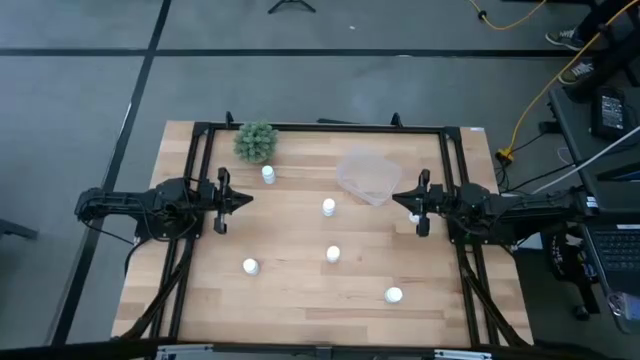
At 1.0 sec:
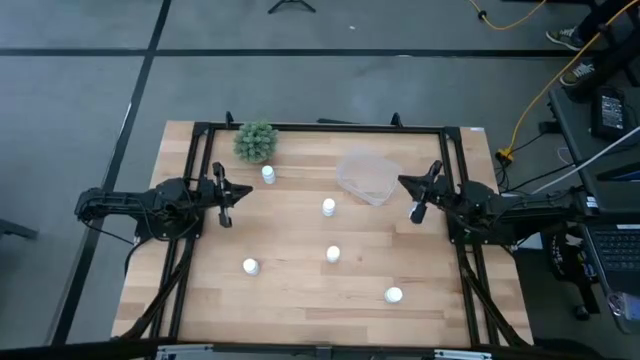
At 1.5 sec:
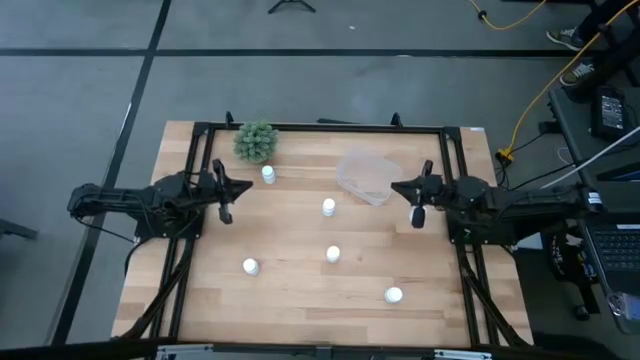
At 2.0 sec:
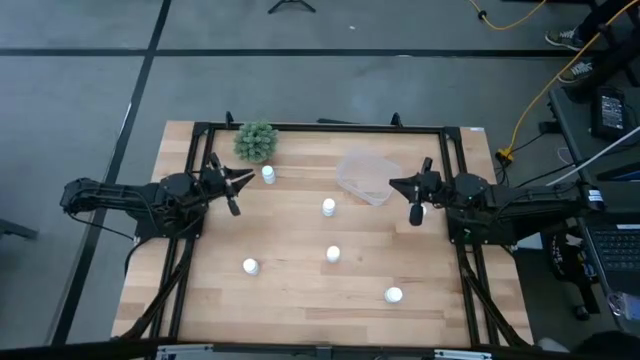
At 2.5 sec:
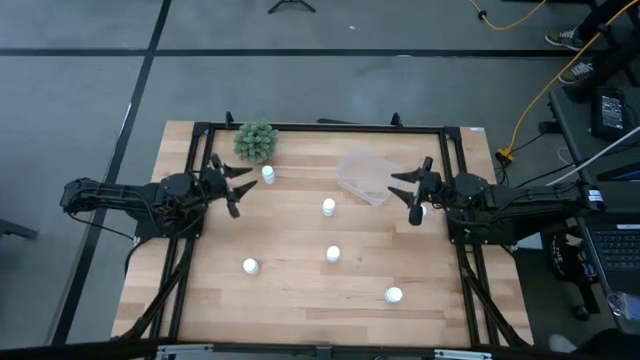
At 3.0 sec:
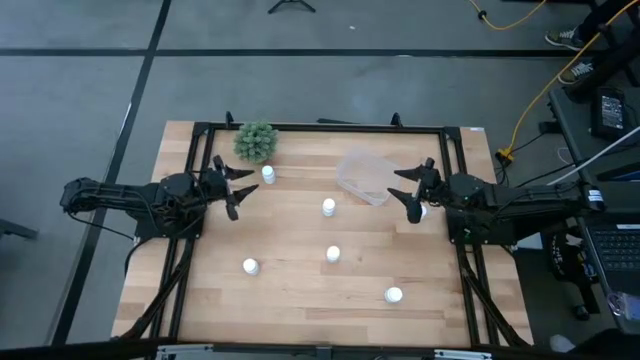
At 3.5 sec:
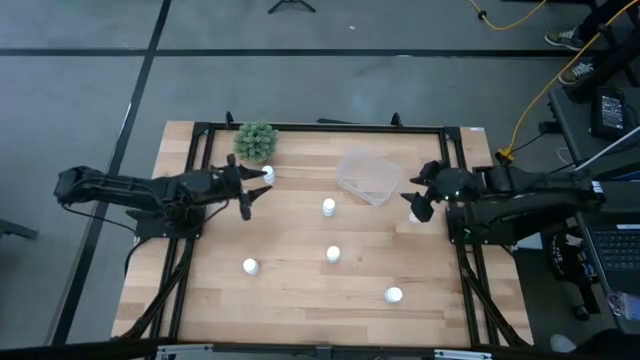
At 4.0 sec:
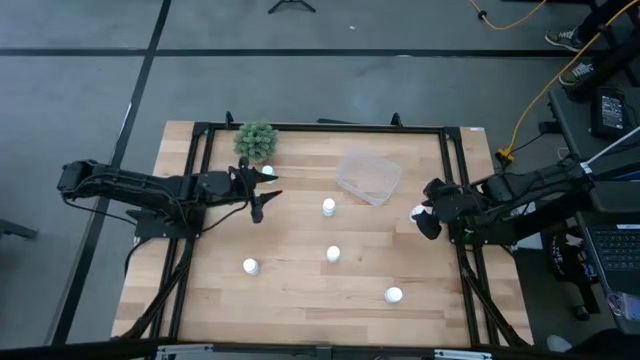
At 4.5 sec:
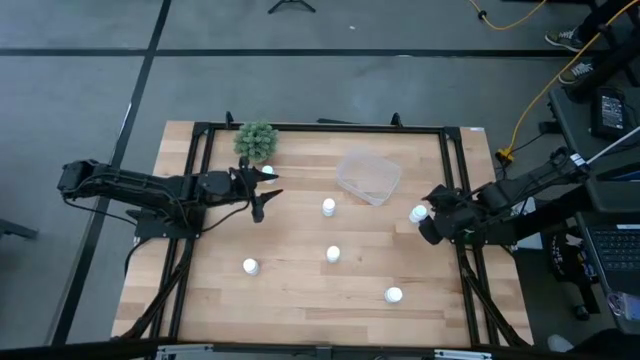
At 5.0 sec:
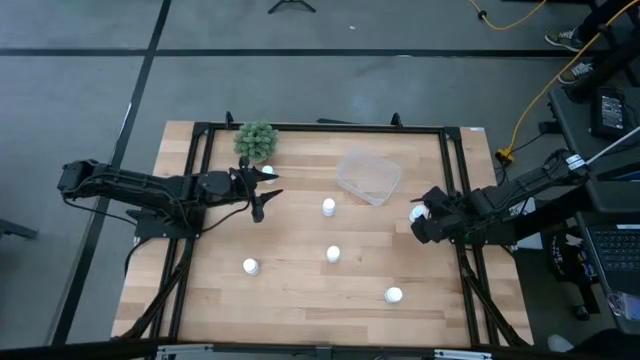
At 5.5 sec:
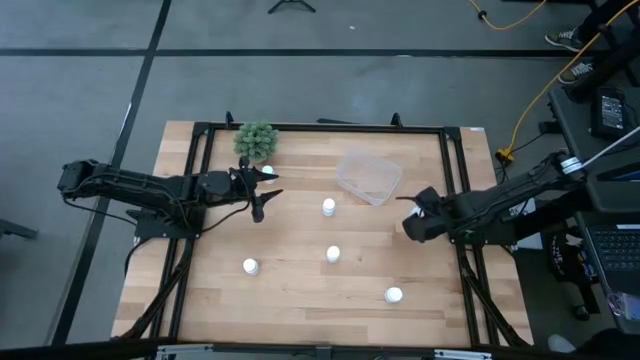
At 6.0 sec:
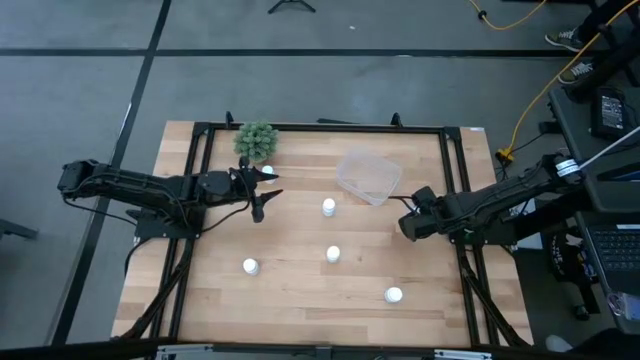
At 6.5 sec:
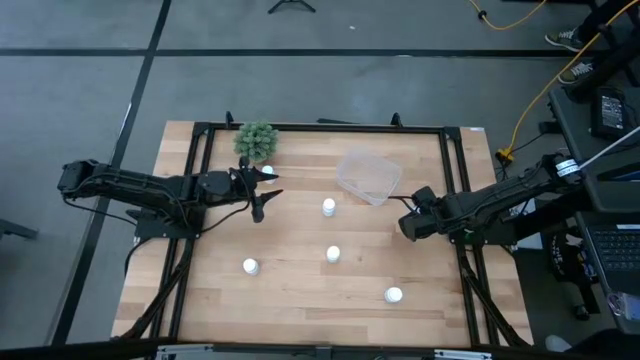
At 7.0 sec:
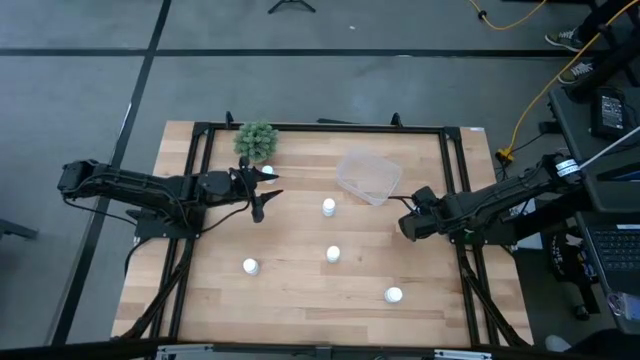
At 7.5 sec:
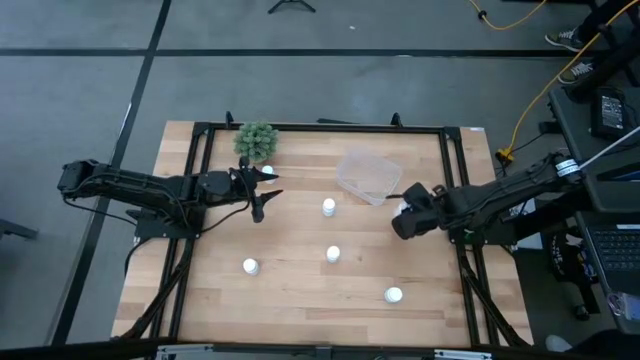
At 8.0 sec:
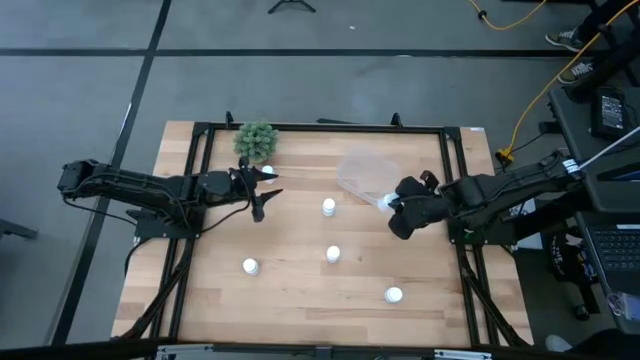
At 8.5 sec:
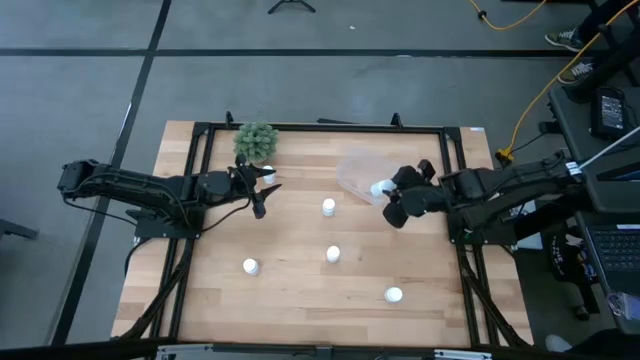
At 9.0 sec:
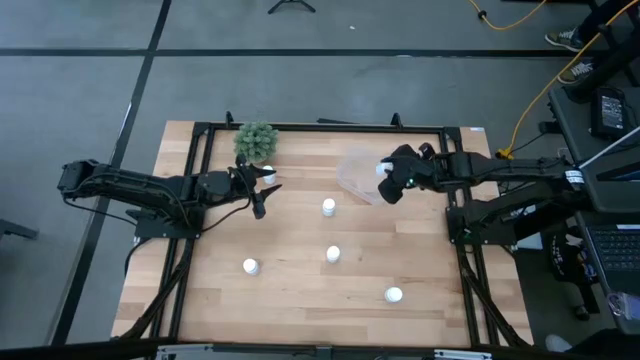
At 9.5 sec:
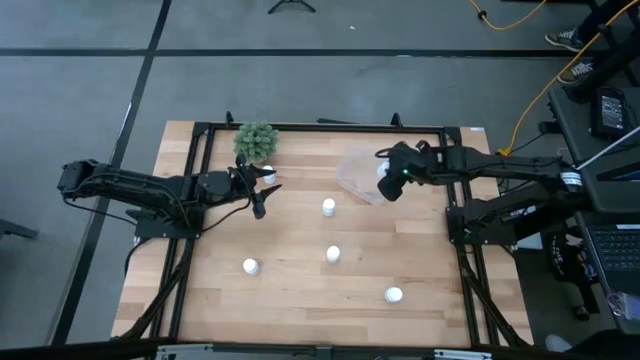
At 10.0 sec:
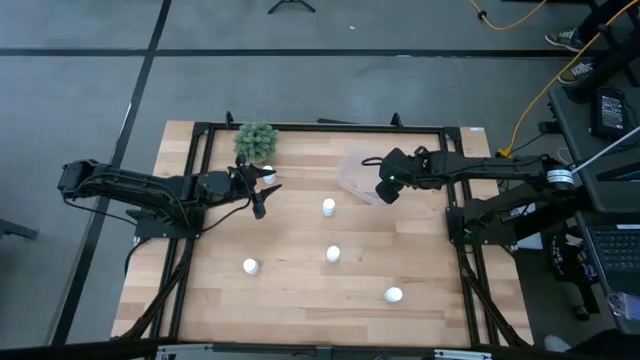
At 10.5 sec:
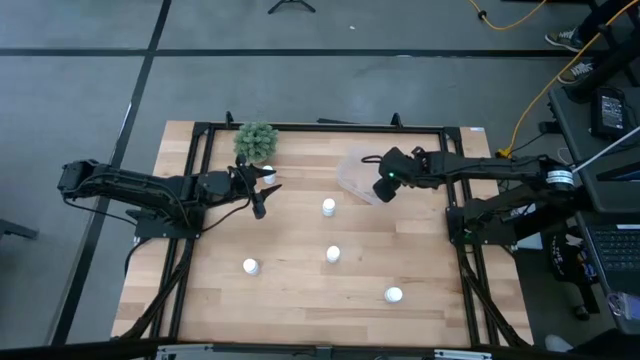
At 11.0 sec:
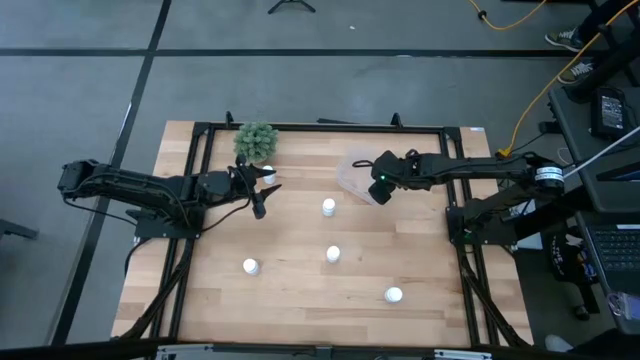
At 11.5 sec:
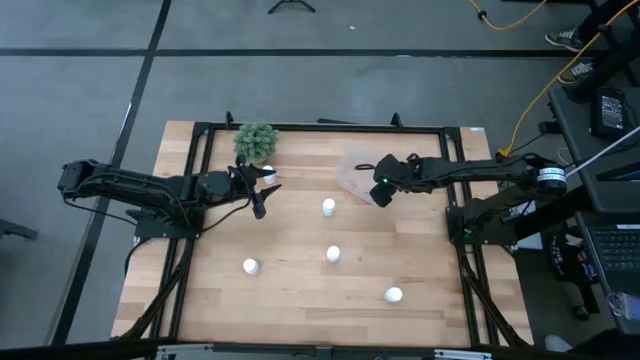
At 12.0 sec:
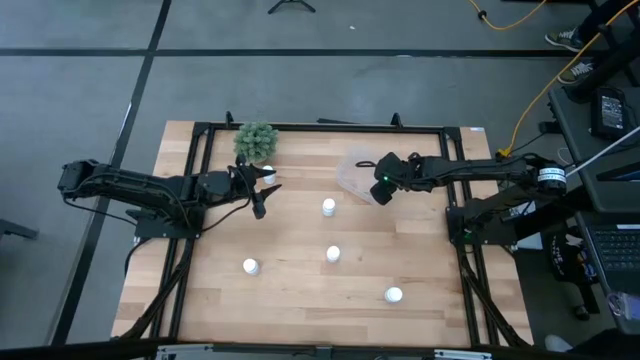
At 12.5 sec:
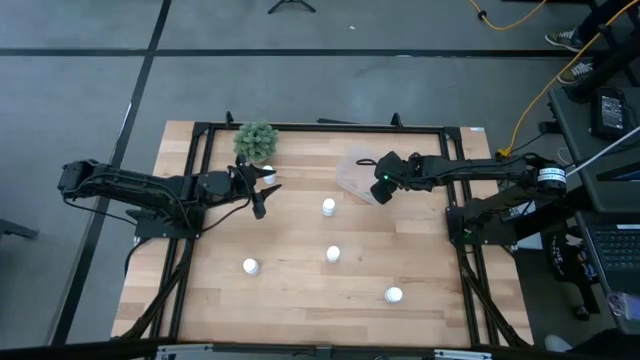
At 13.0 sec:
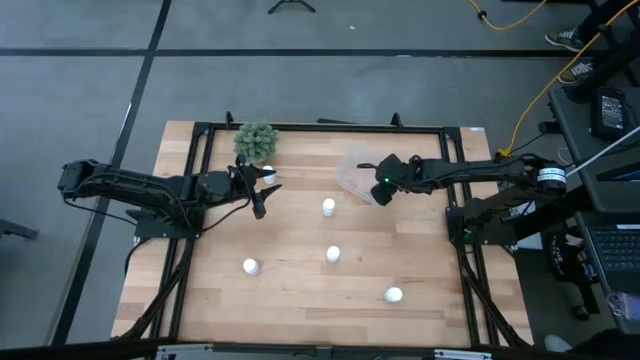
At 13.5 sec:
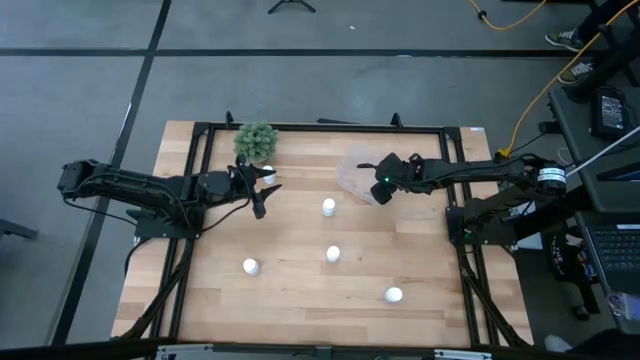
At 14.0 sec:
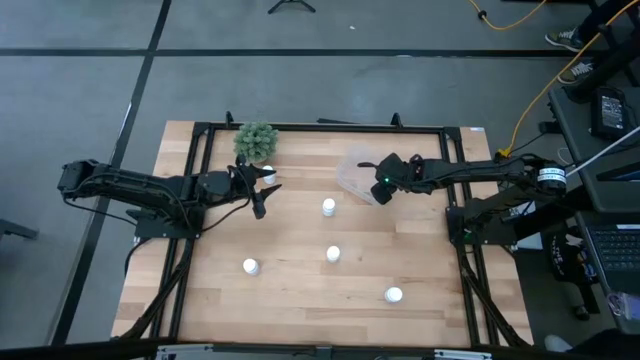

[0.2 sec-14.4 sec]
Task: Pick and place pill bottles into a basket
Put the white pill bottle into the transparent bin

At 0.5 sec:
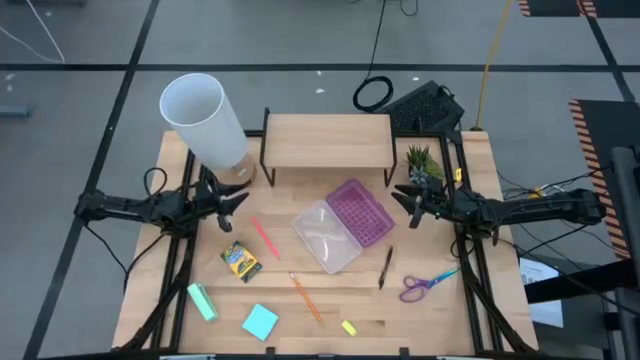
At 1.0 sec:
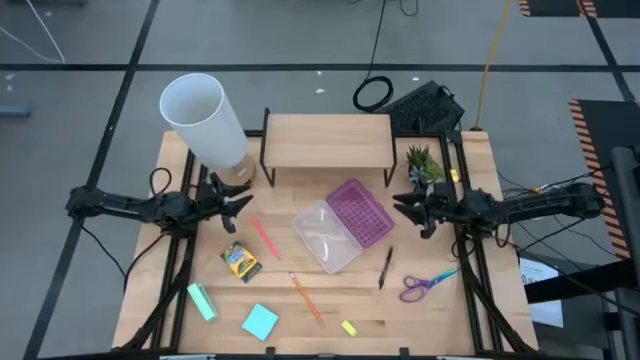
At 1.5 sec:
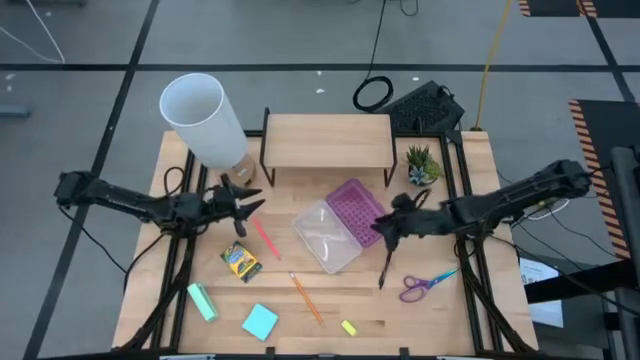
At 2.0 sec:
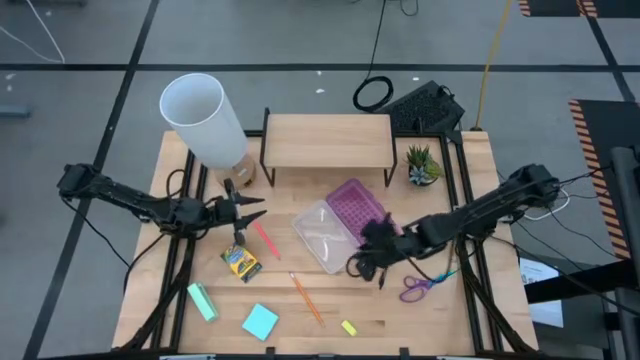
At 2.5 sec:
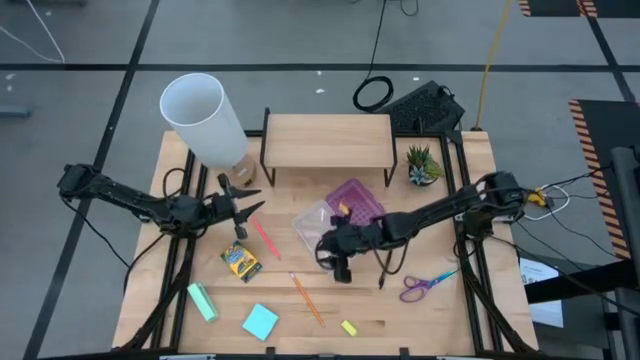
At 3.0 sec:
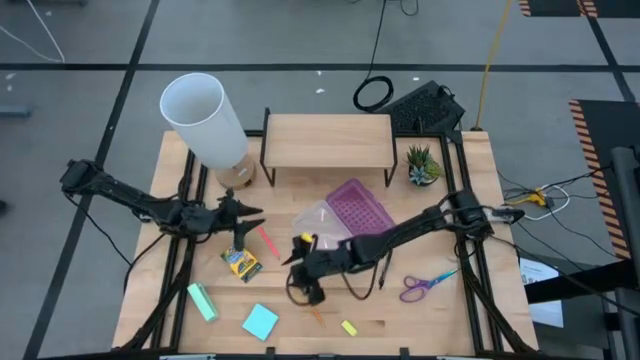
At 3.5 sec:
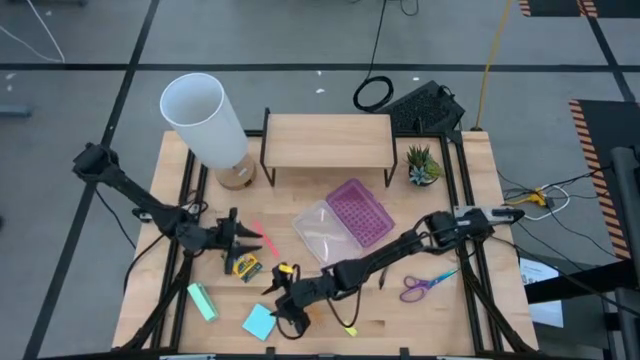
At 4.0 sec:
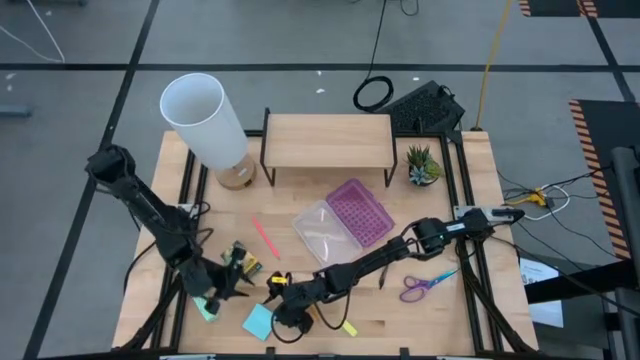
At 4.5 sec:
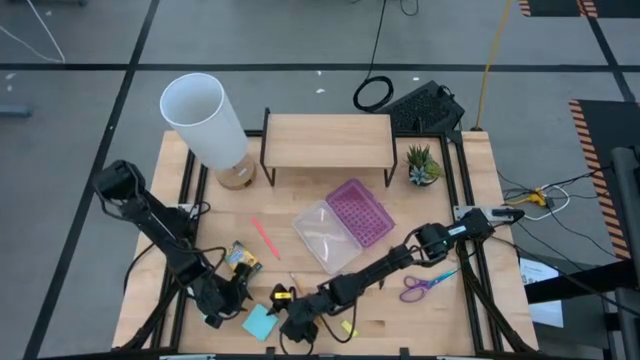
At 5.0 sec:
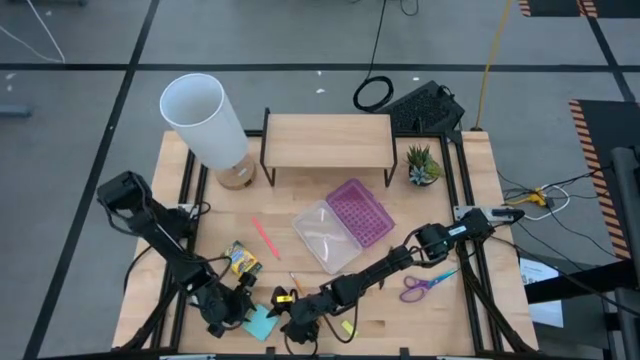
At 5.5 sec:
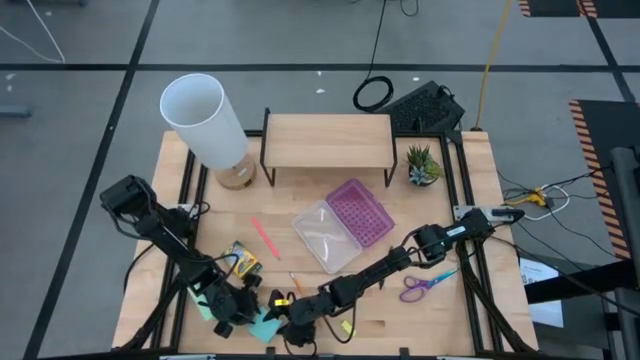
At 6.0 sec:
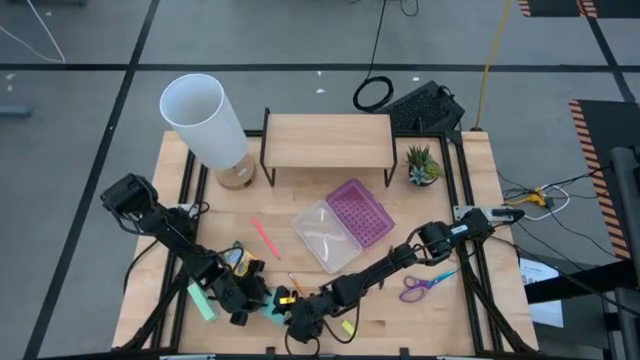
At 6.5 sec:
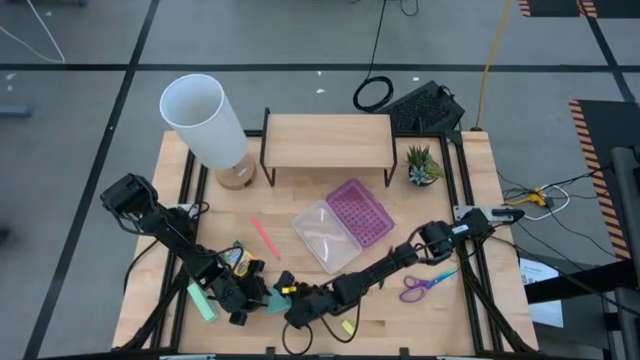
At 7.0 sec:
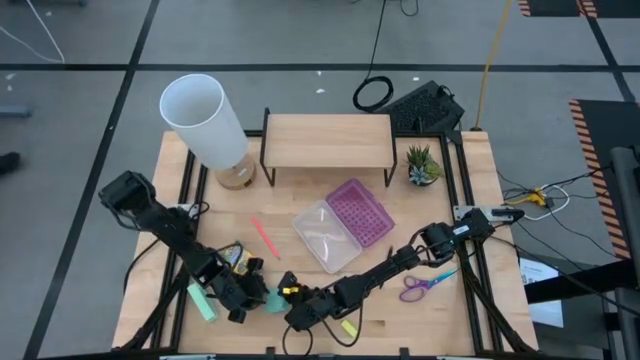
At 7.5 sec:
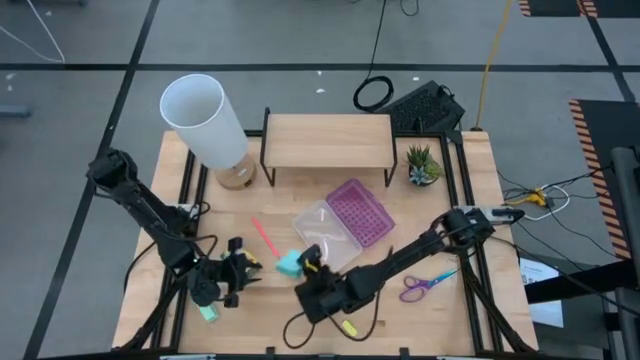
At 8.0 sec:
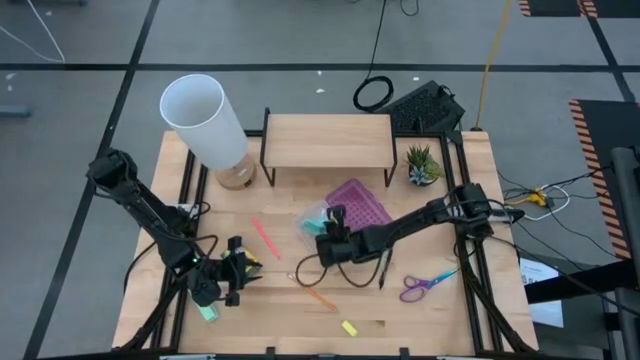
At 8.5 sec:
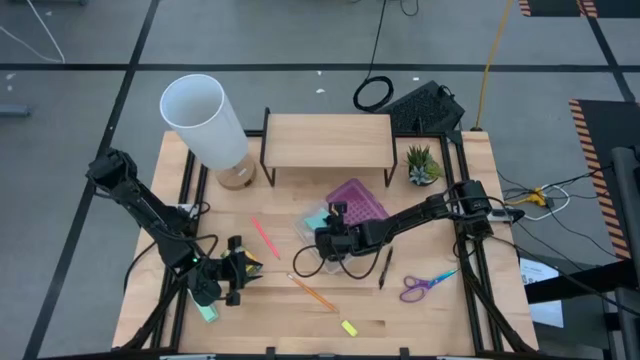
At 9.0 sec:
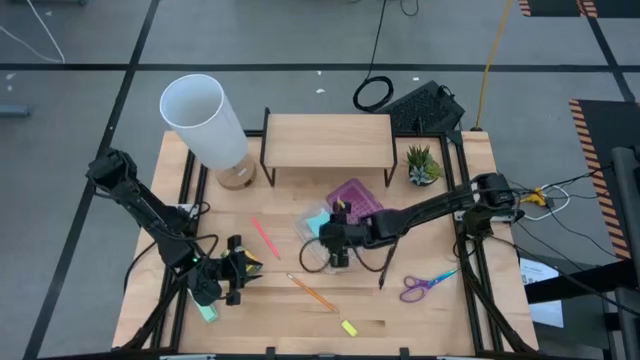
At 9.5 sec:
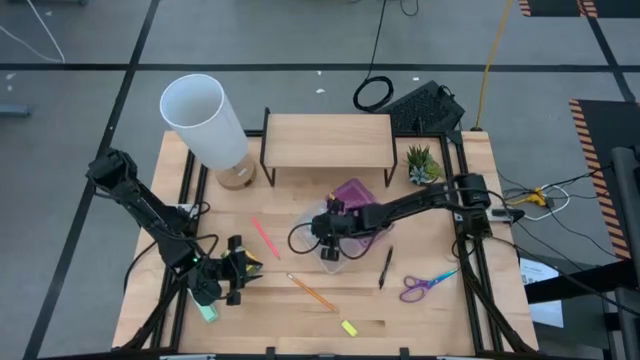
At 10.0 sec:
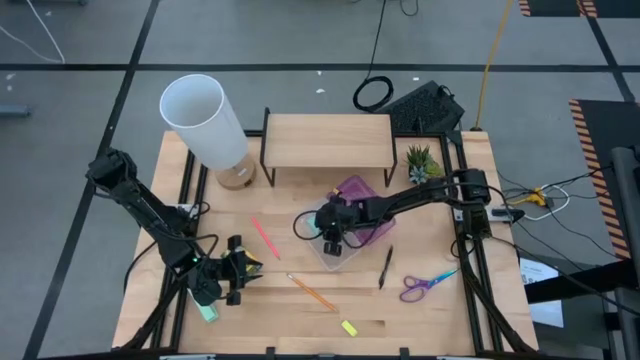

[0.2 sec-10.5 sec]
Task: Pack school essentials
Put the blue sticky notes into the transparent violet supply box
